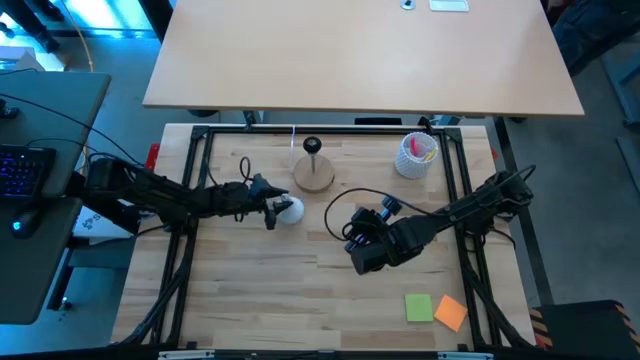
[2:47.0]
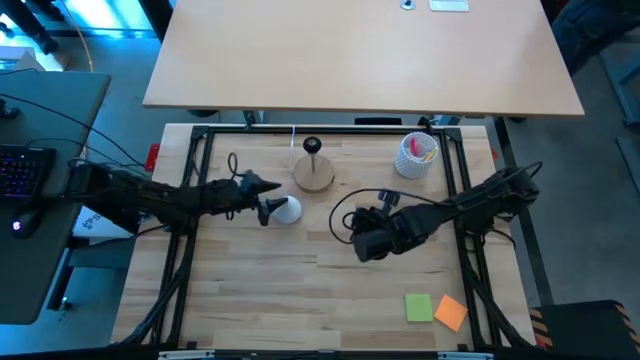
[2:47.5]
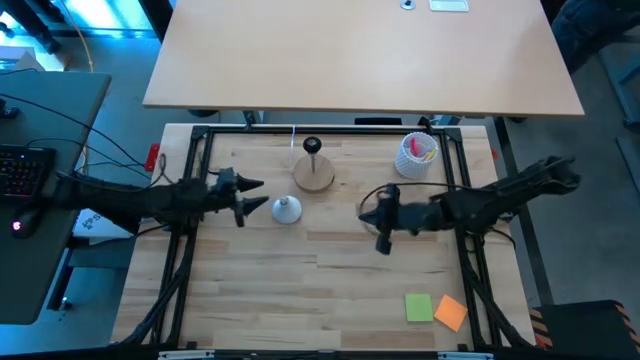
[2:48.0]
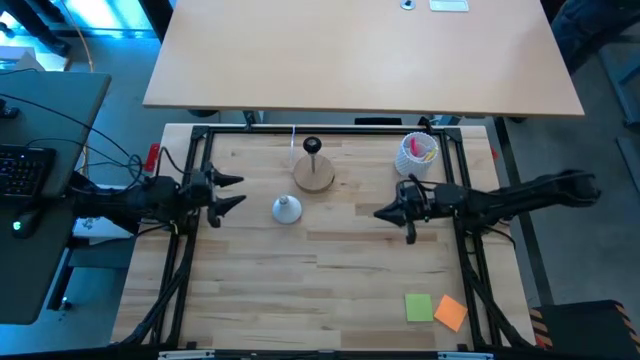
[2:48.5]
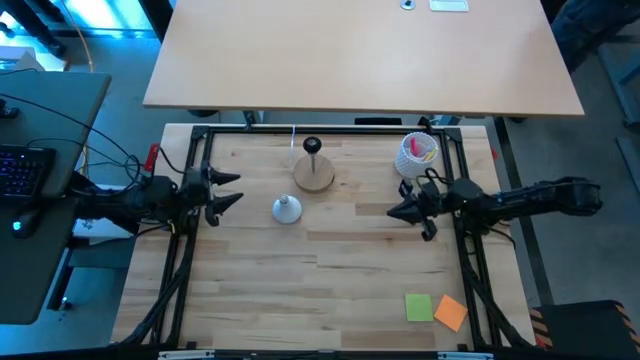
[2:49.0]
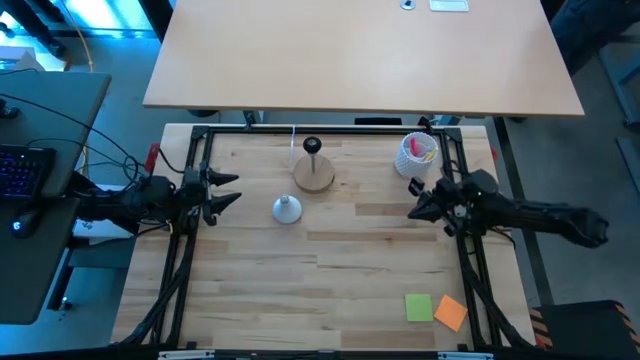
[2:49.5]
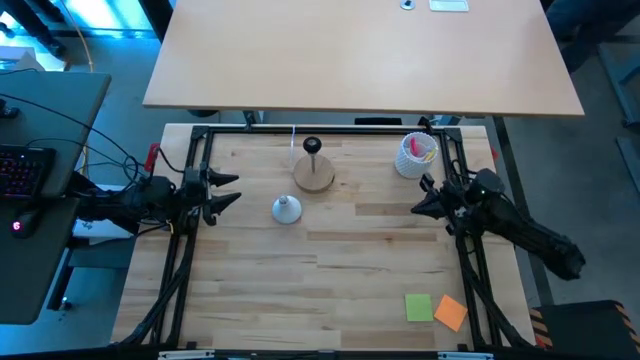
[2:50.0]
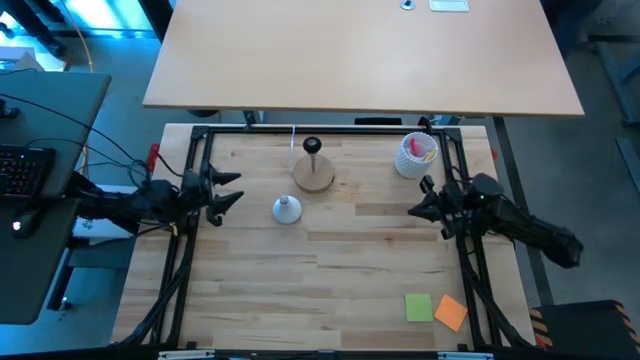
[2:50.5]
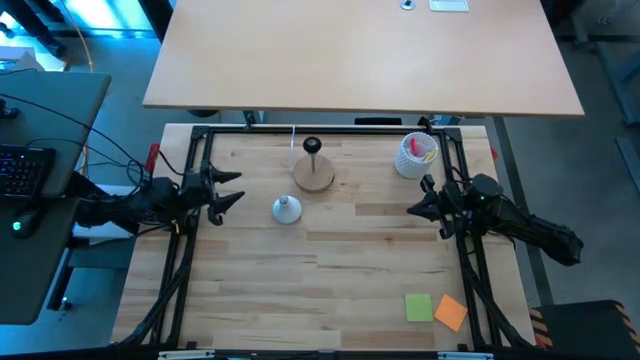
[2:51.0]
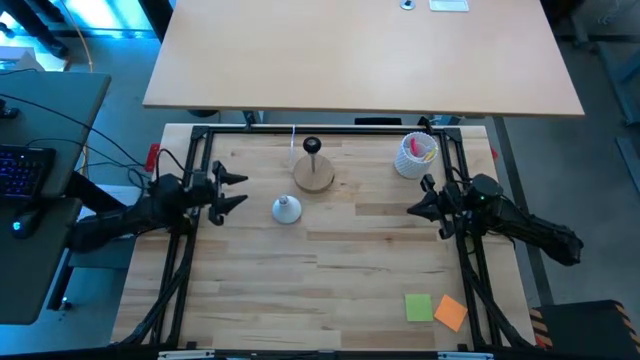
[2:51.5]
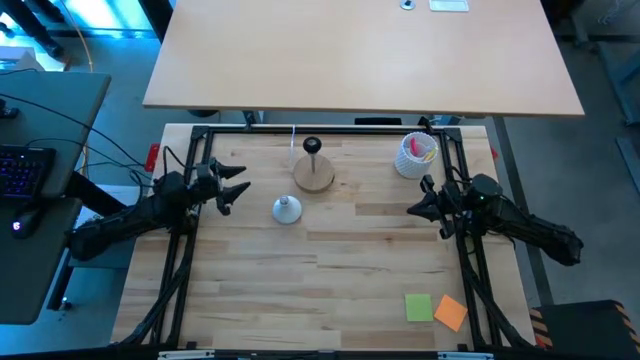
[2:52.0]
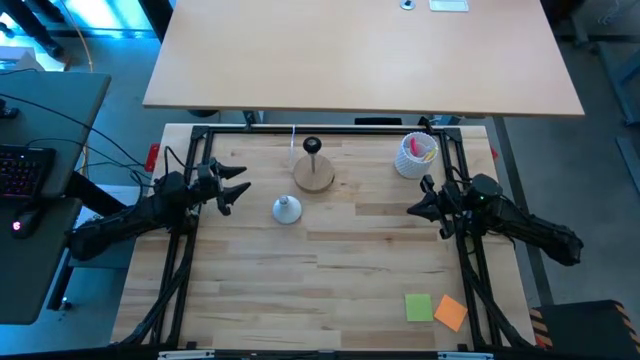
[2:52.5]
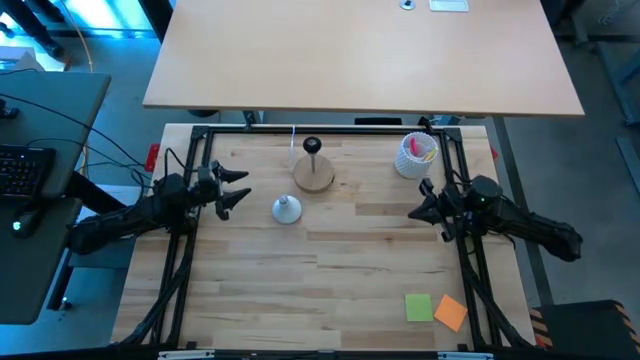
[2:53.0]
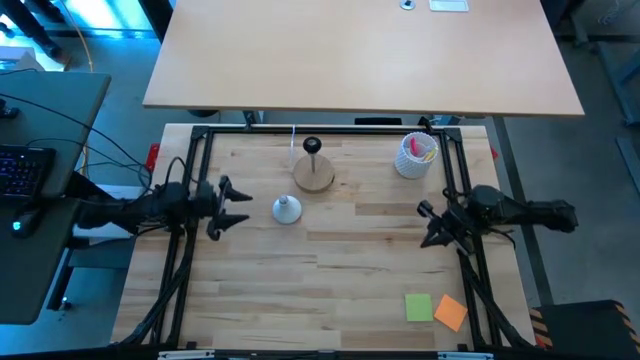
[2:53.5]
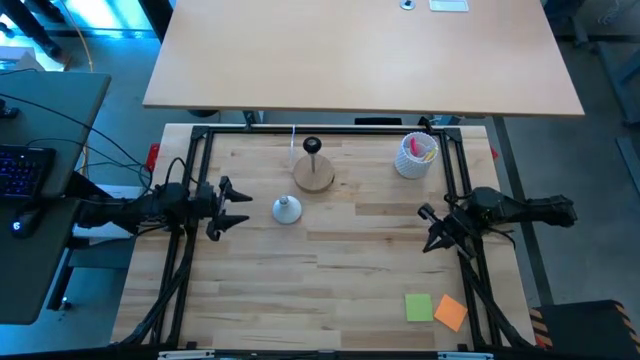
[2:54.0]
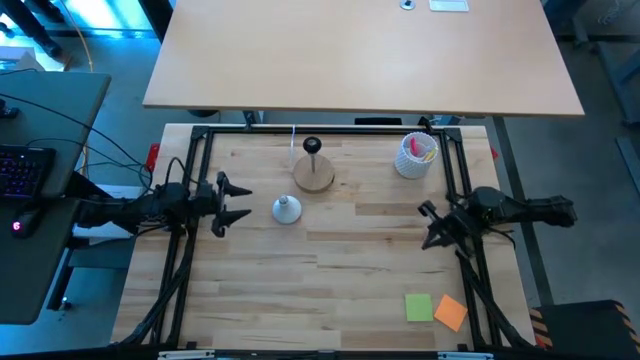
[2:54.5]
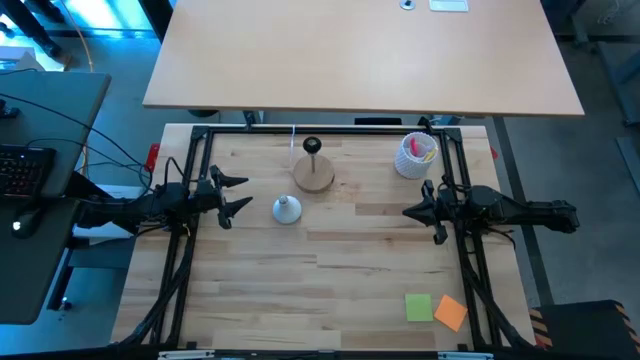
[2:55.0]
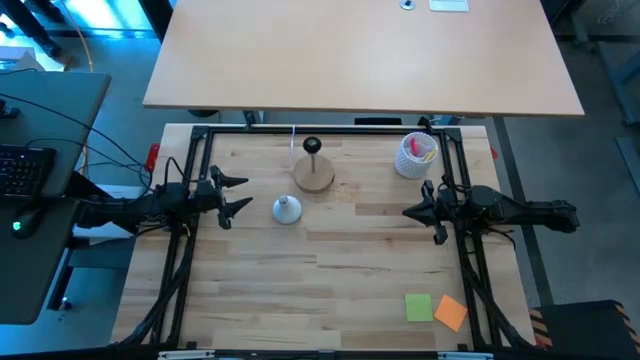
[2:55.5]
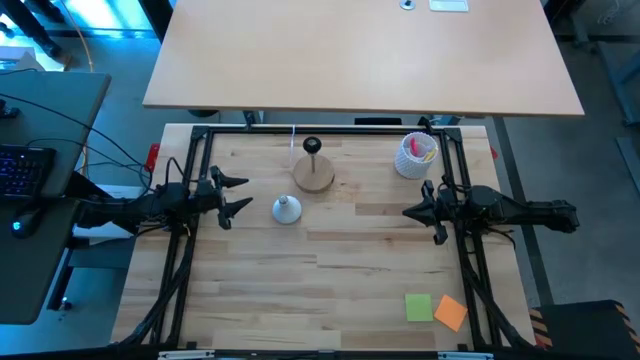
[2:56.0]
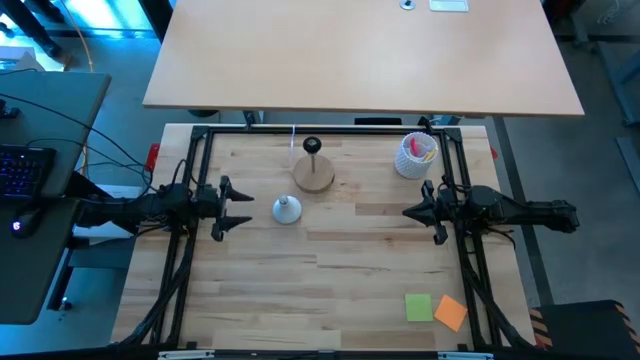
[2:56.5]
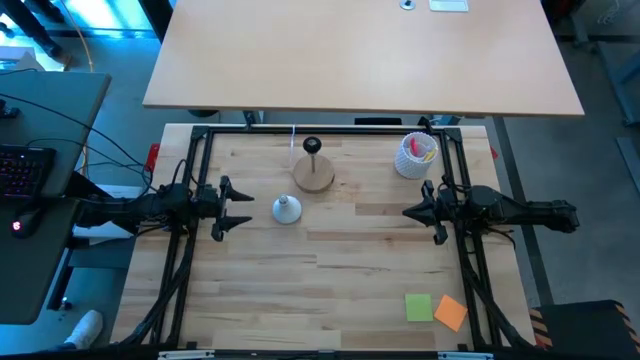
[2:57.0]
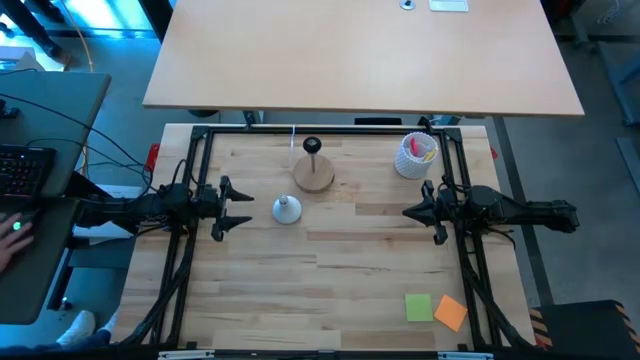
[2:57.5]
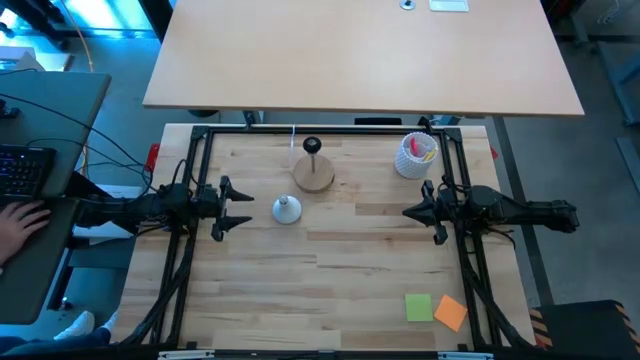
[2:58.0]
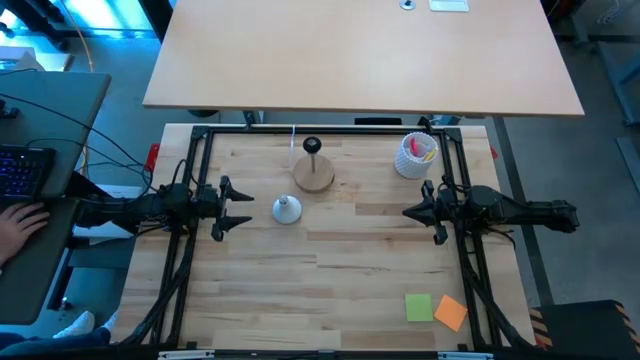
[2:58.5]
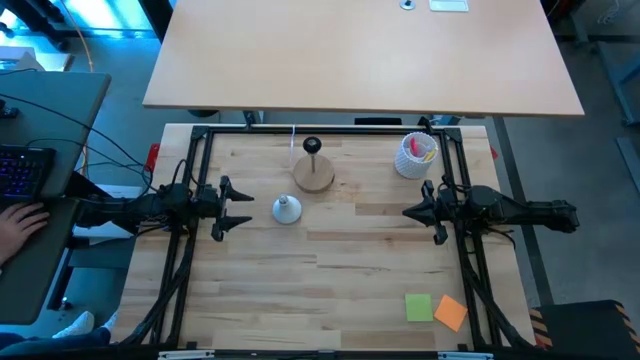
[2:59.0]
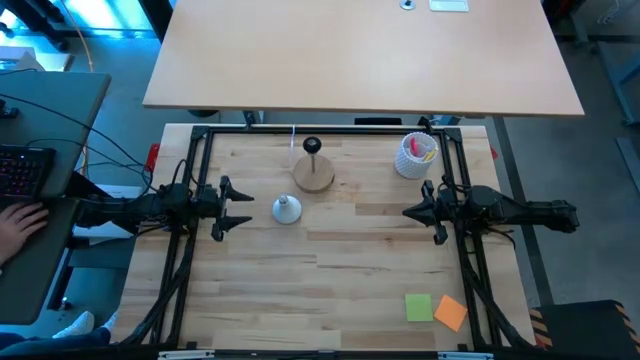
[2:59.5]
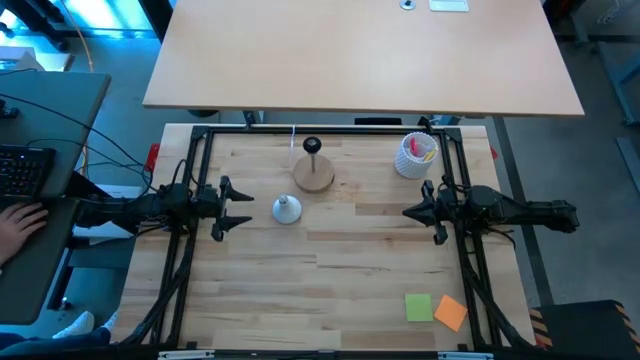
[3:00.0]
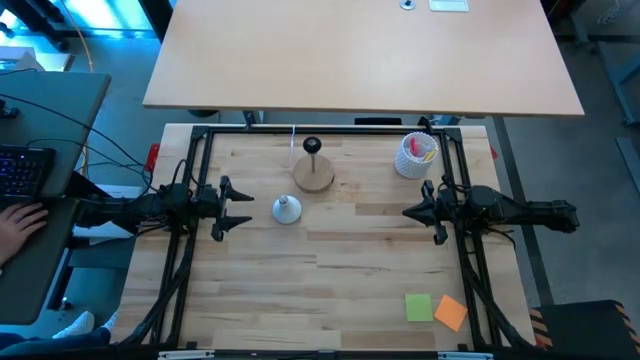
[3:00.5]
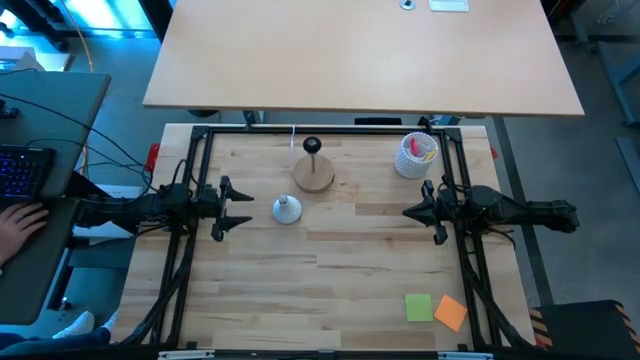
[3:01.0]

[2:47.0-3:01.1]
Task: Screw lightbulb
Return to Home Position

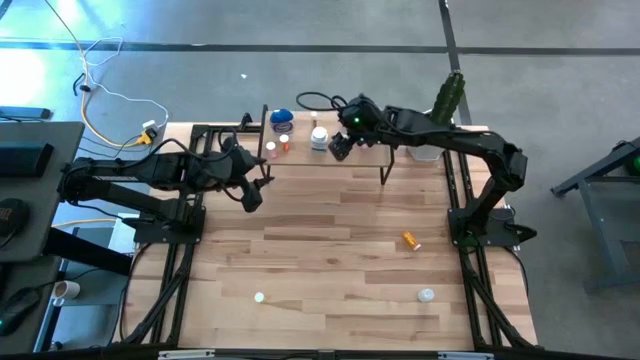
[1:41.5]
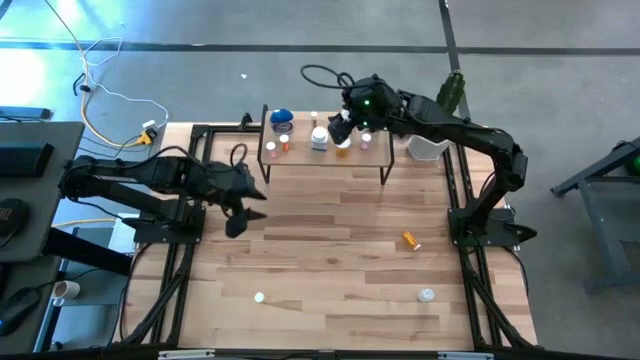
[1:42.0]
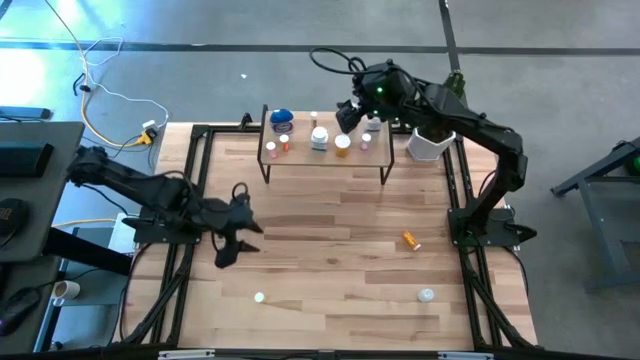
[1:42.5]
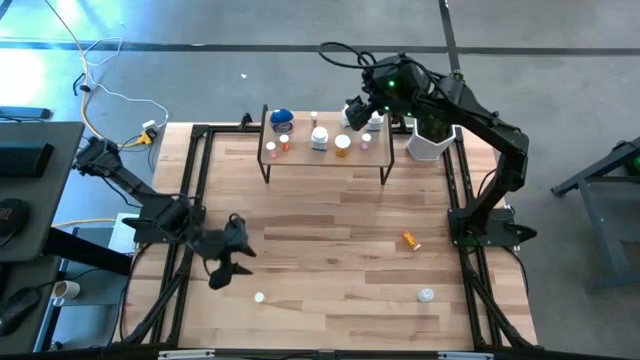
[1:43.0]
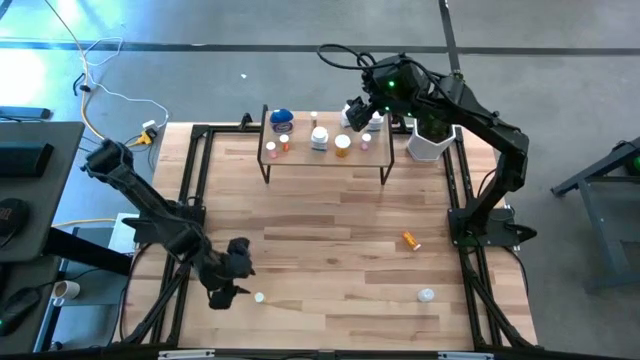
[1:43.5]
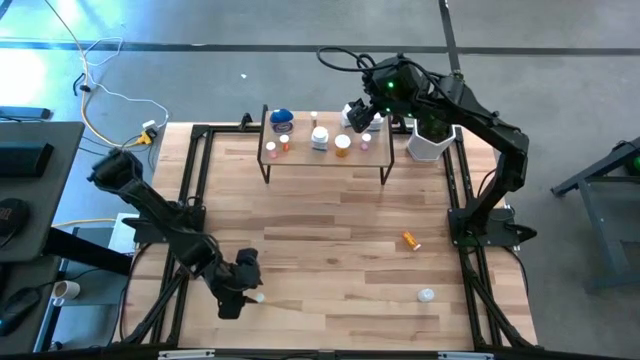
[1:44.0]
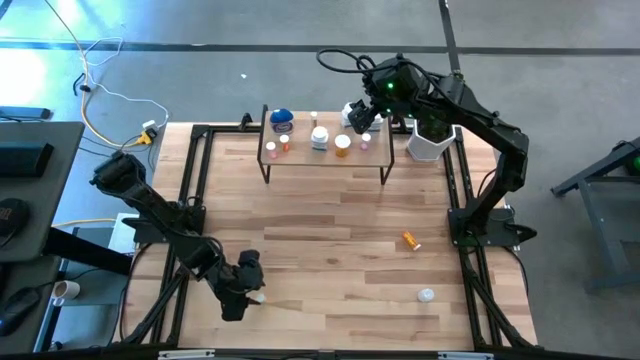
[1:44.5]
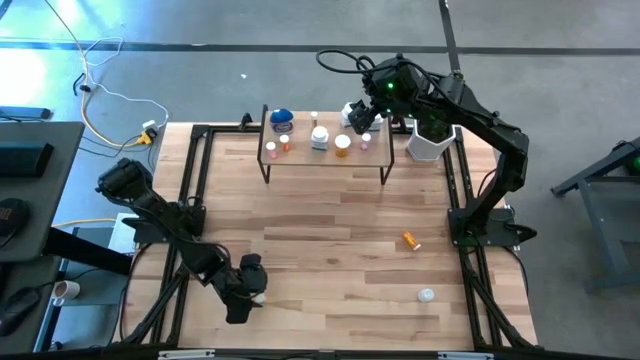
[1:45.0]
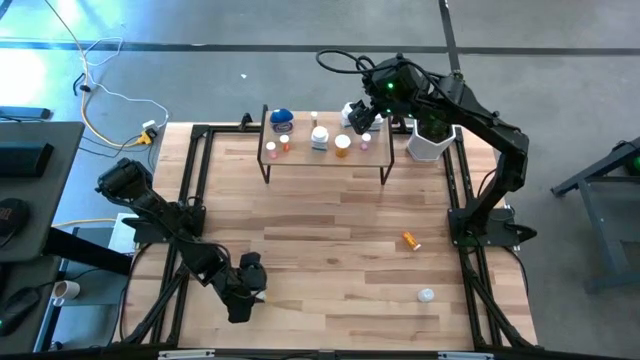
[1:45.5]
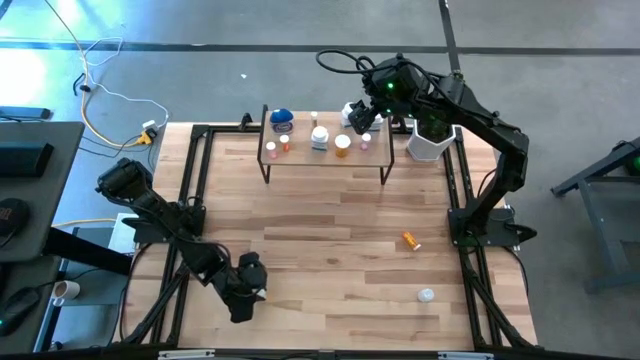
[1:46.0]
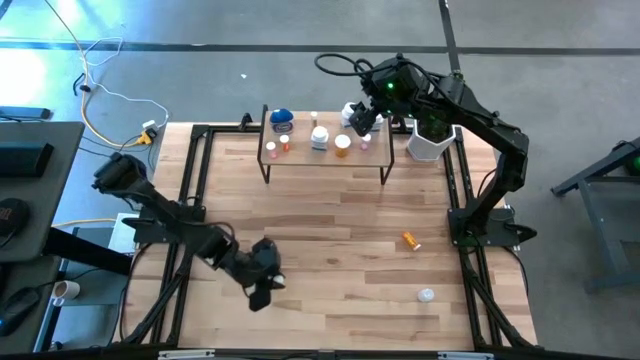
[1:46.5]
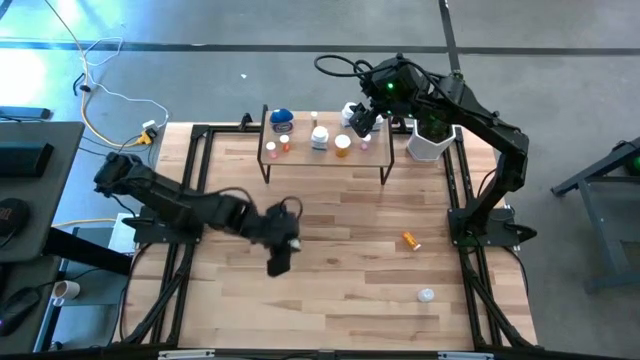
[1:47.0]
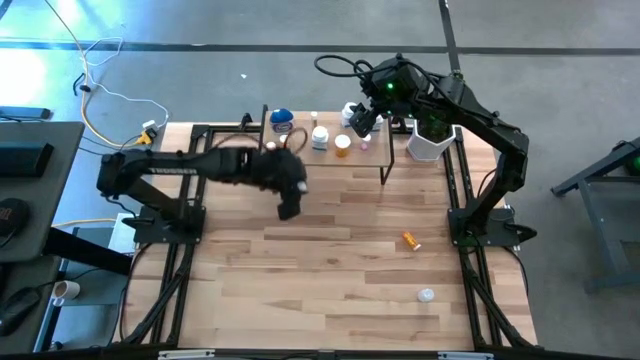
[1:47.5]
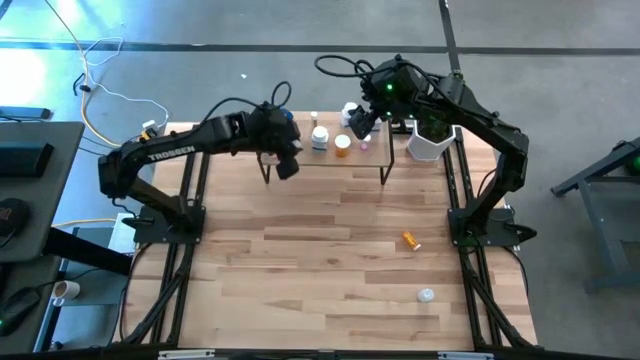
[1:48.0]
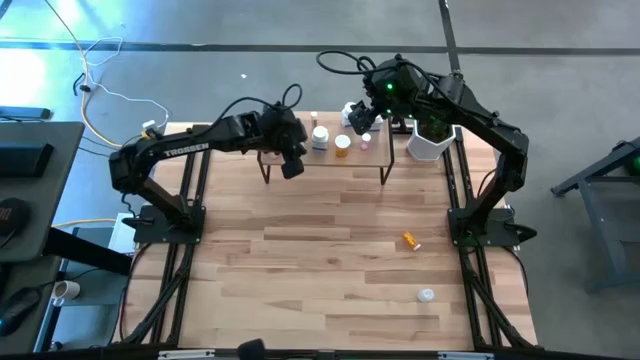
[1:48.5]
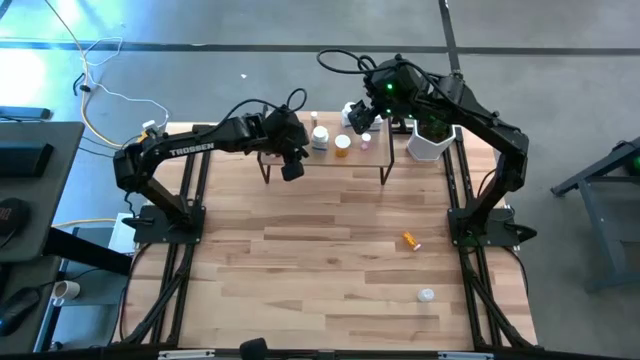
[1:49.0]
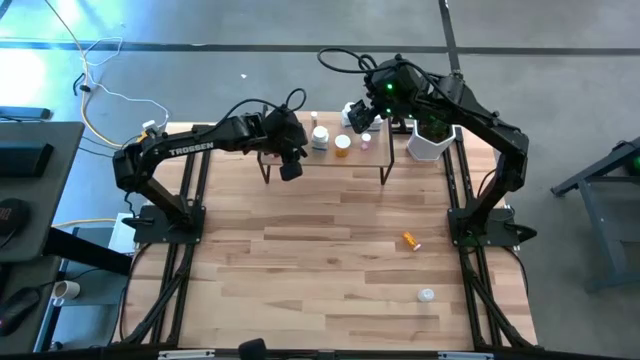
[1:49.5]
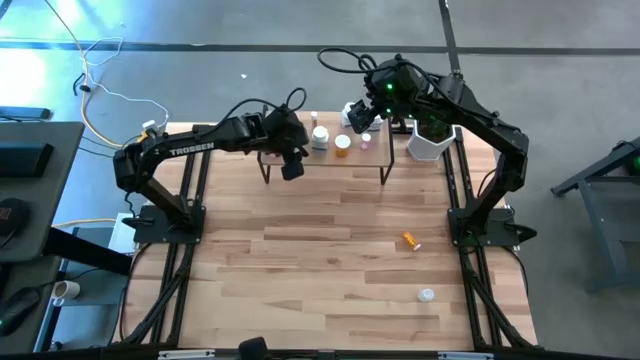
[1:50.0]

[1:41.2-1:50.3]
Task: Pick and place medicine bottles onto shelf by color
Put the orange pill bottle on the shelf
